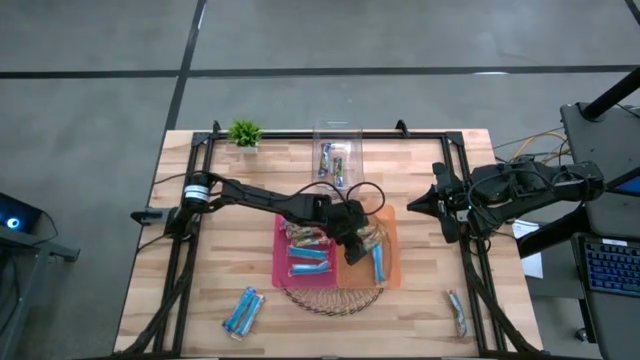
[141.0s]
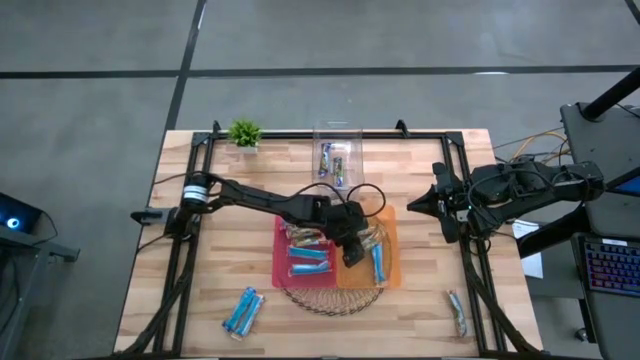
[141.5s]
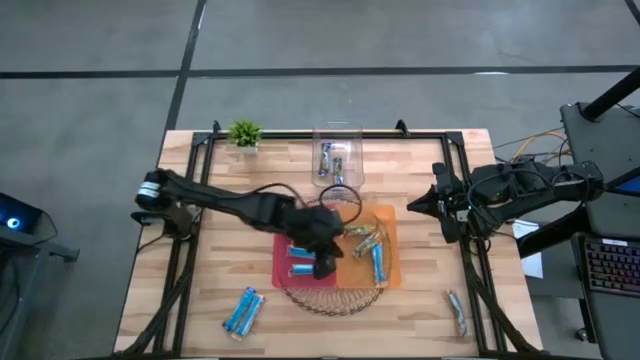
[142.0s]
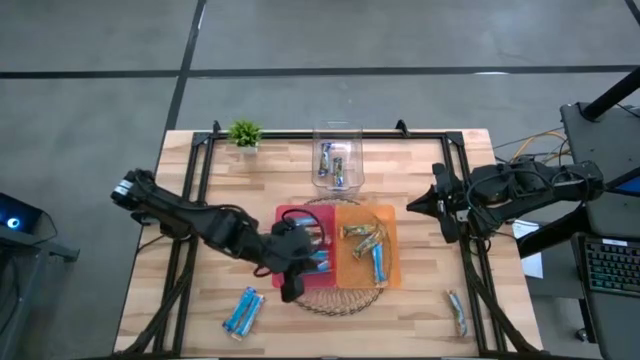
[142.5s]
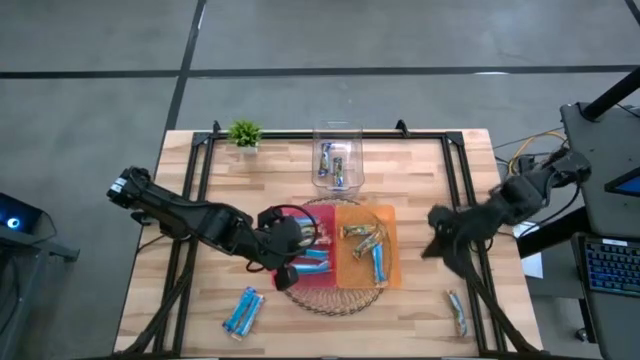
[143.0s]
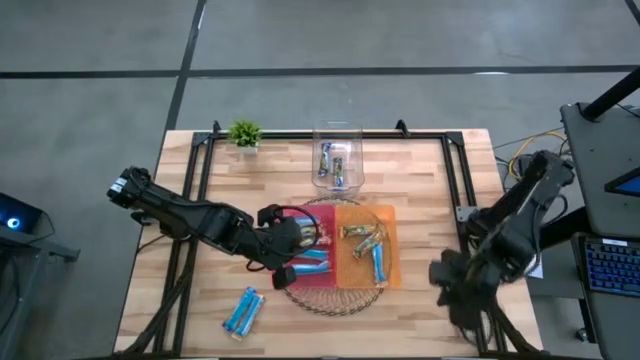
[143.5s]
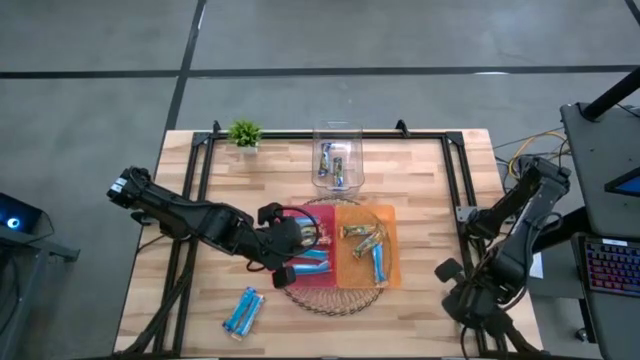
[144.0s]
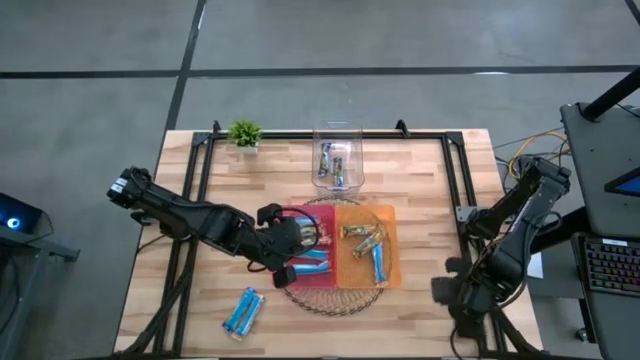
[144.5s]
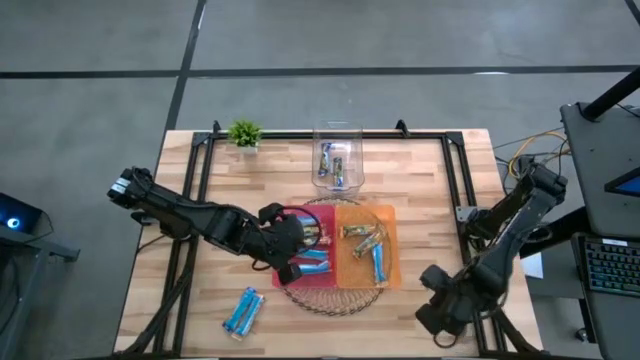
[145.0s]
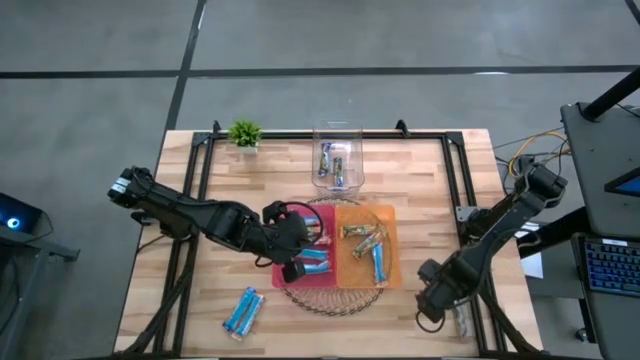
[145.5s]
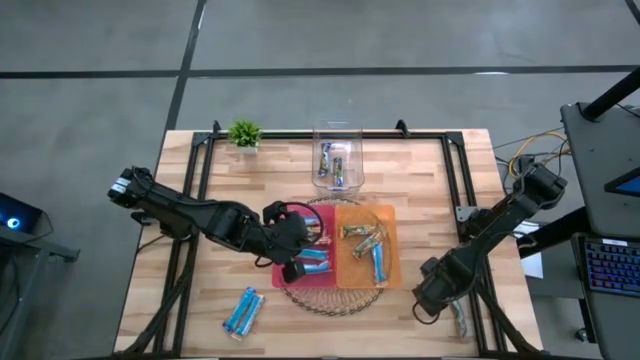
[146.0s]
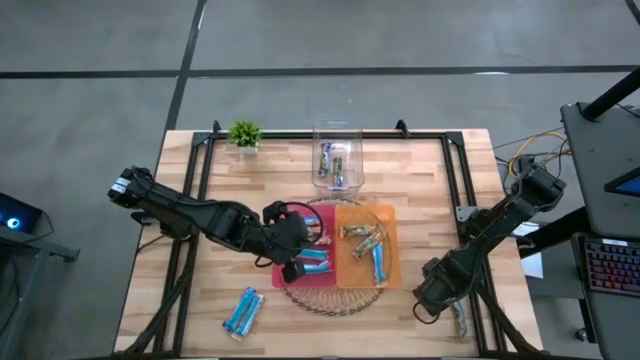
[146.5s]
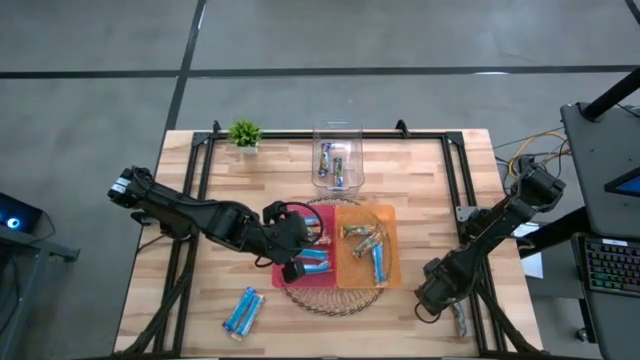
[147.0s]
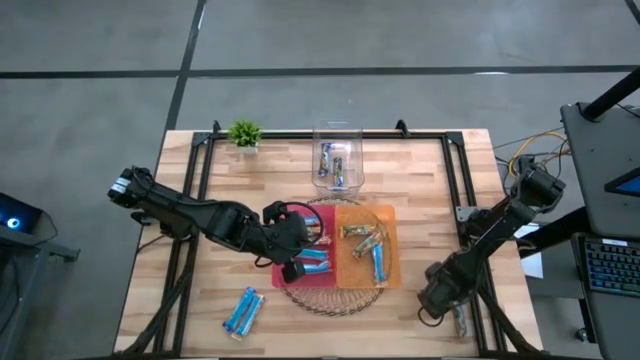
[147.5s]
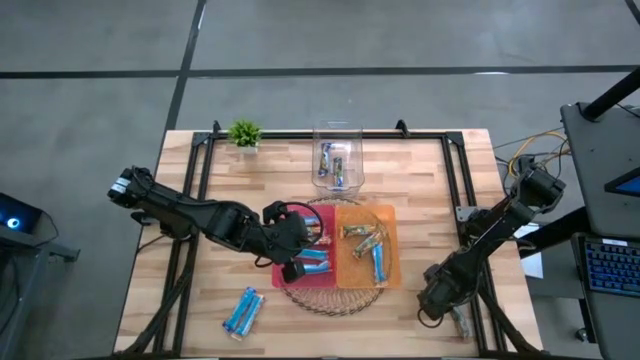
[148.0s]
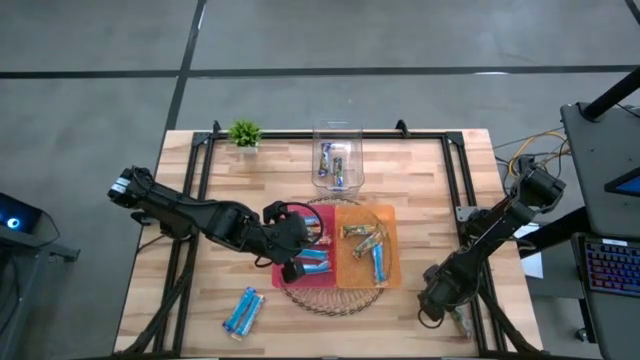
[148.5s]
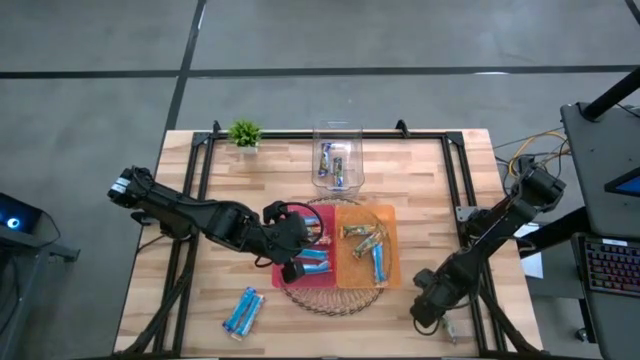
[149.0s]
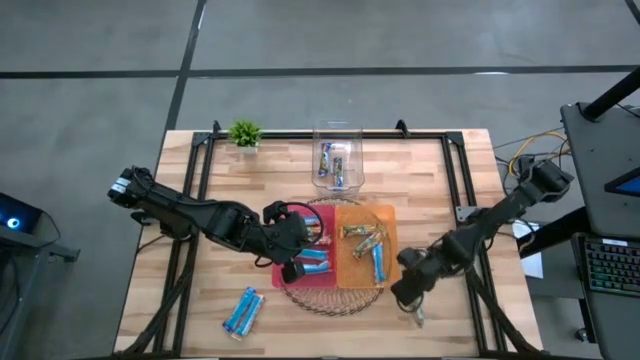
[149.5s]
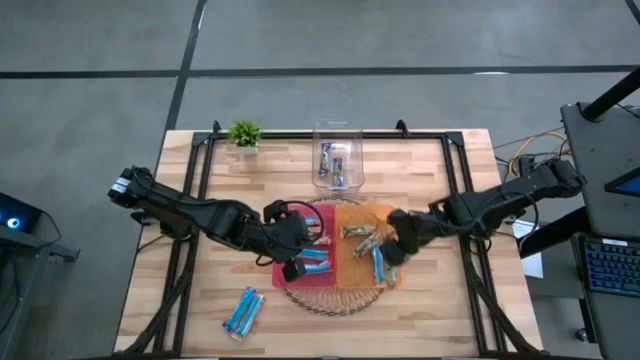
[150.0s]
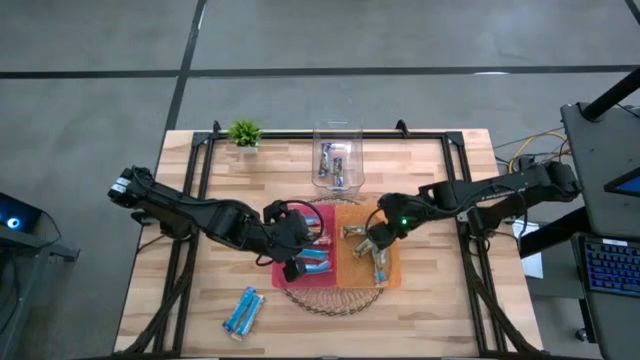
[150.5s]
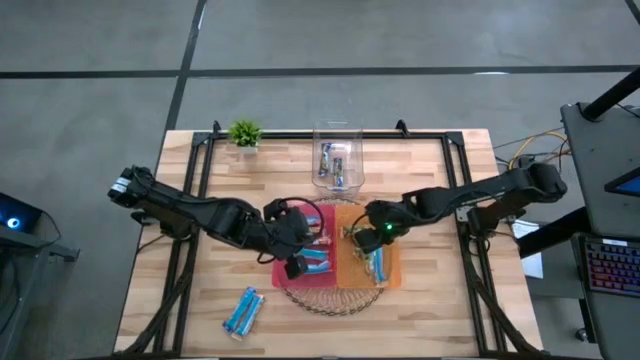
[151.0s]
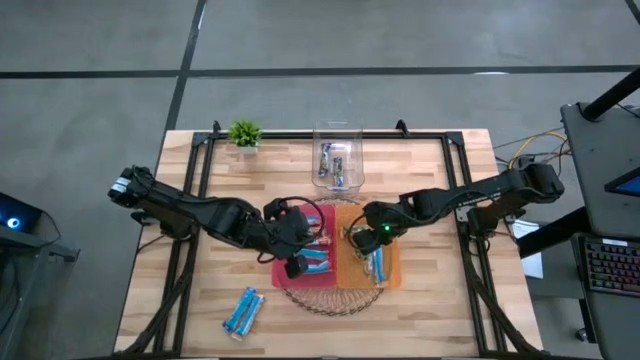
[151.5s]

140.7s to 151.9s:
Task: Pick and place Granola Bars by type
Put the yellow granola bar into the orange bin

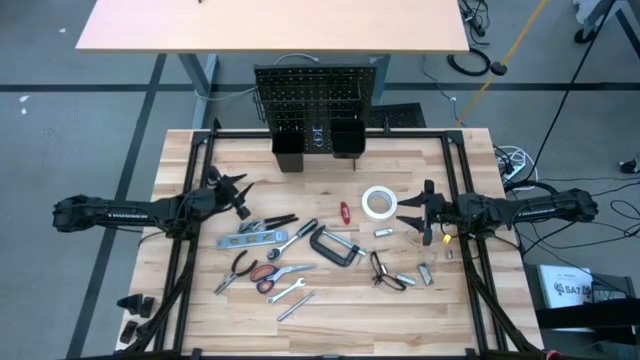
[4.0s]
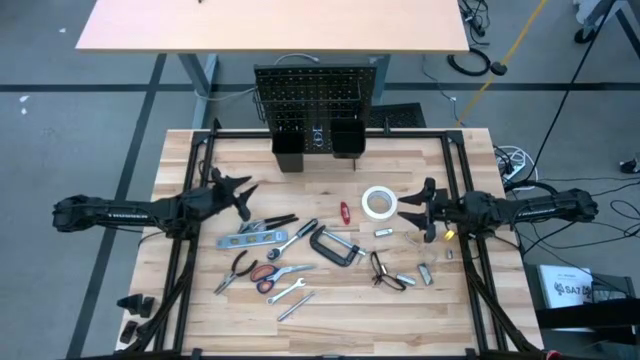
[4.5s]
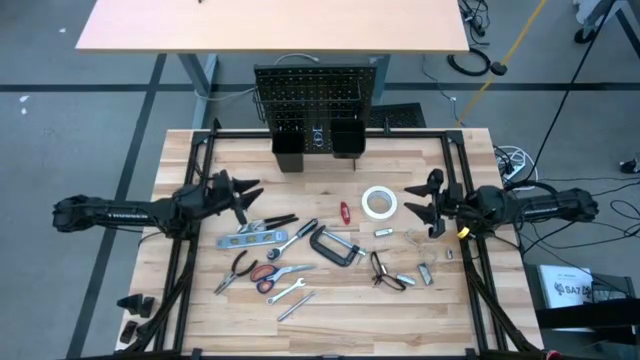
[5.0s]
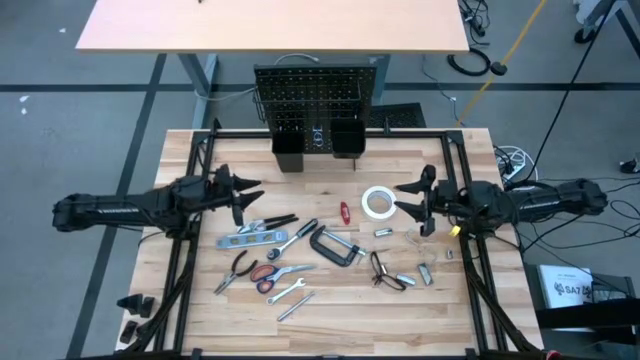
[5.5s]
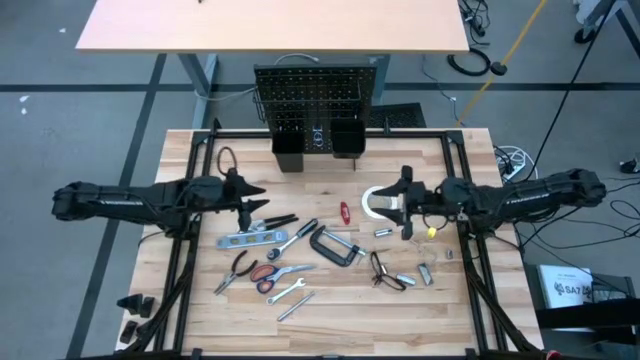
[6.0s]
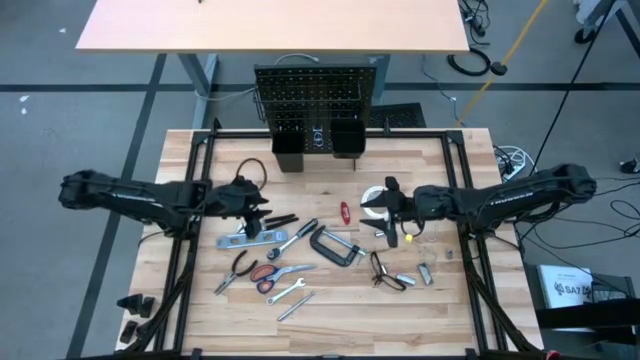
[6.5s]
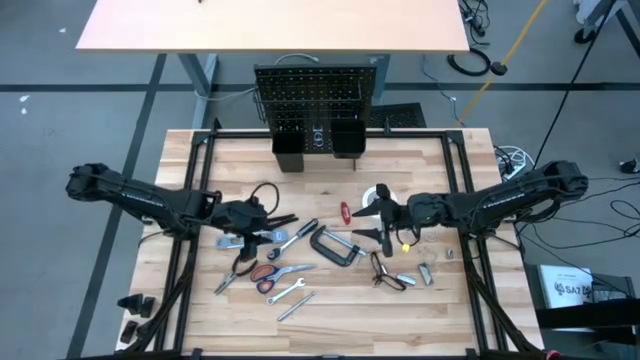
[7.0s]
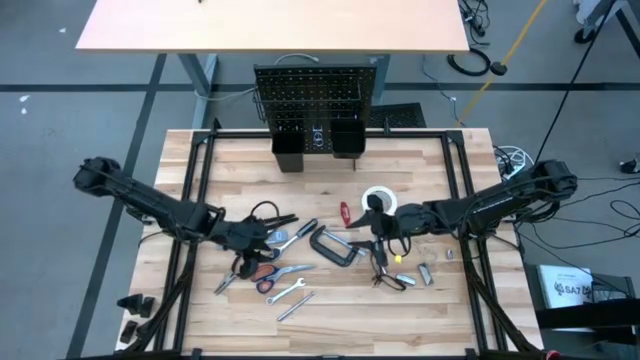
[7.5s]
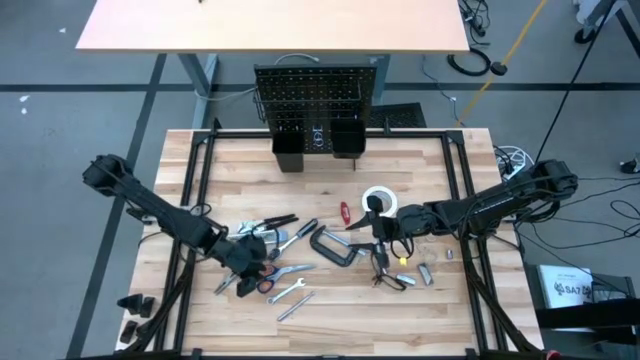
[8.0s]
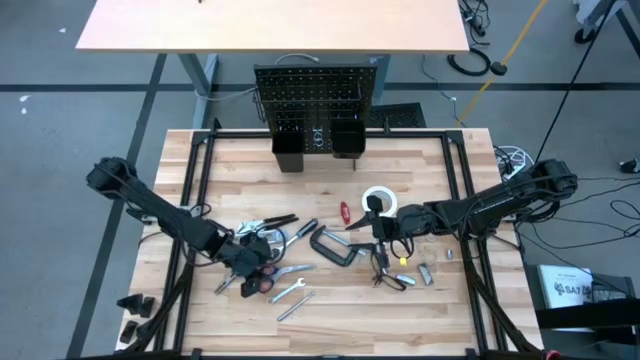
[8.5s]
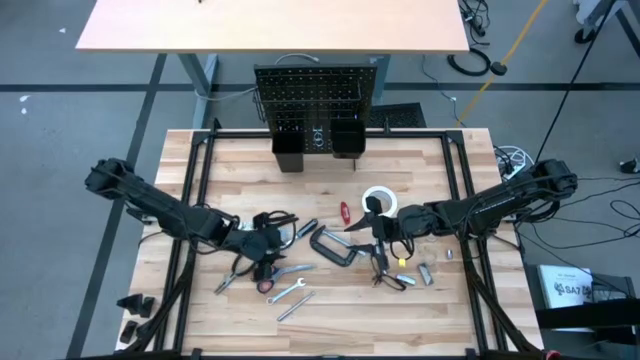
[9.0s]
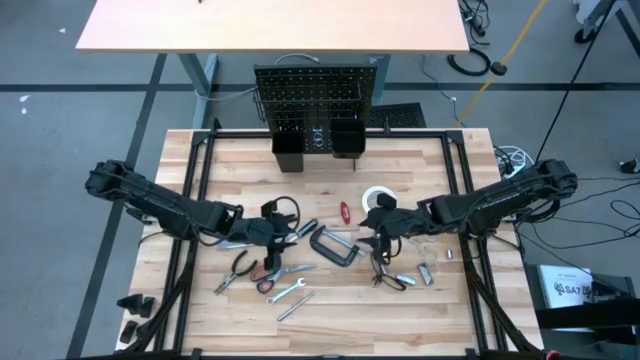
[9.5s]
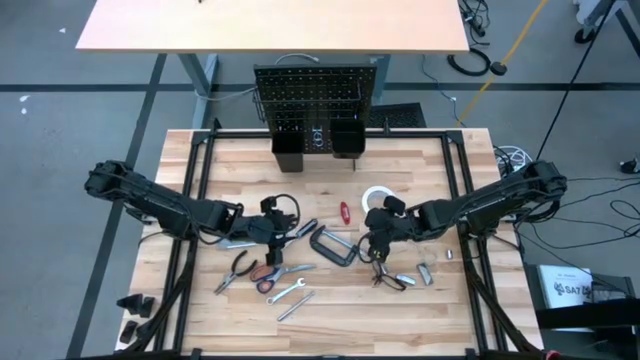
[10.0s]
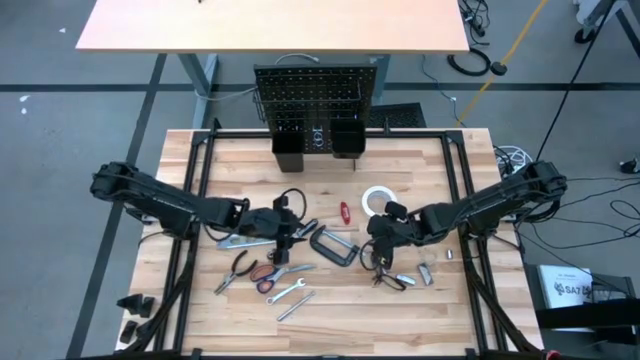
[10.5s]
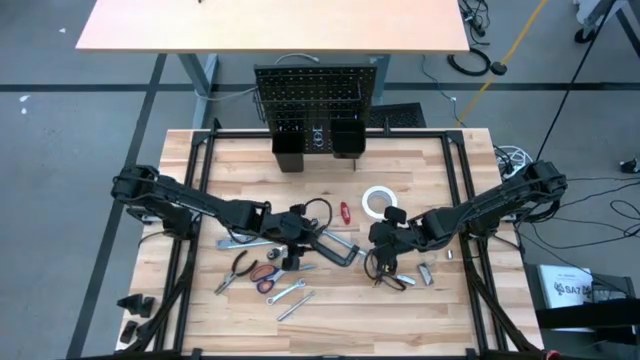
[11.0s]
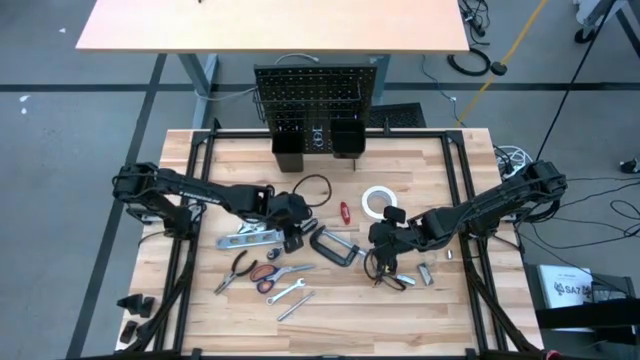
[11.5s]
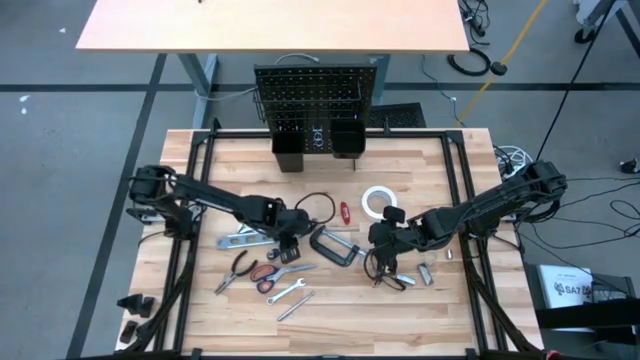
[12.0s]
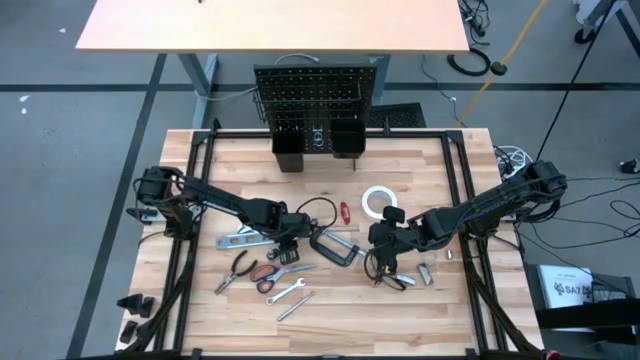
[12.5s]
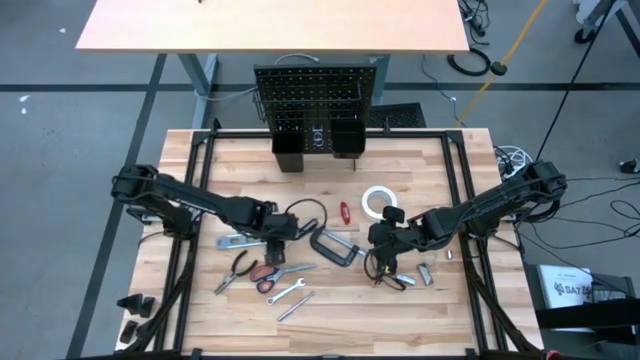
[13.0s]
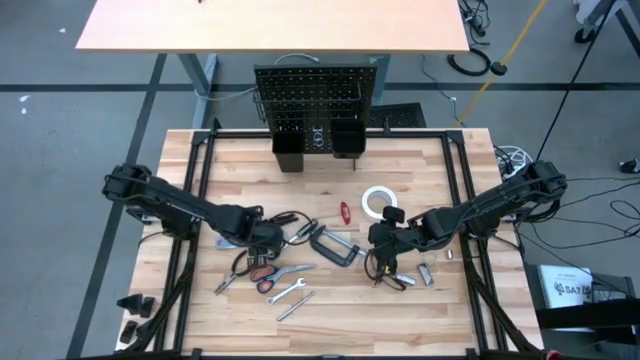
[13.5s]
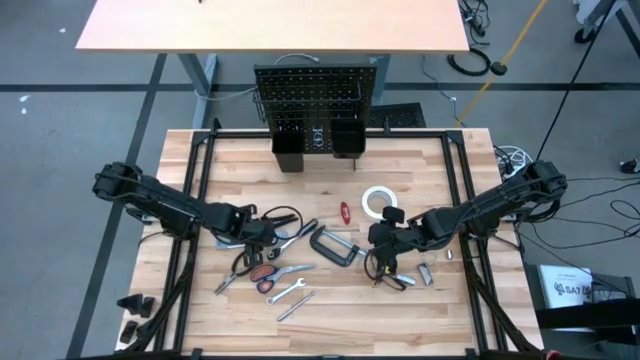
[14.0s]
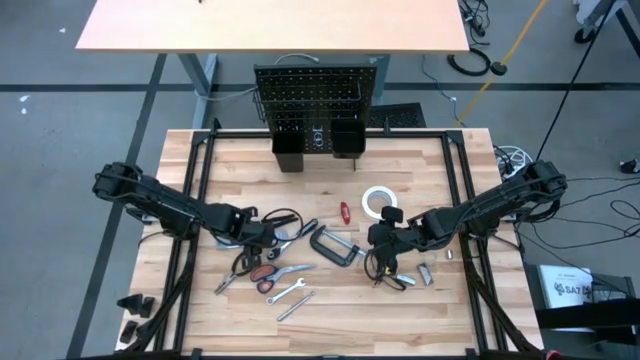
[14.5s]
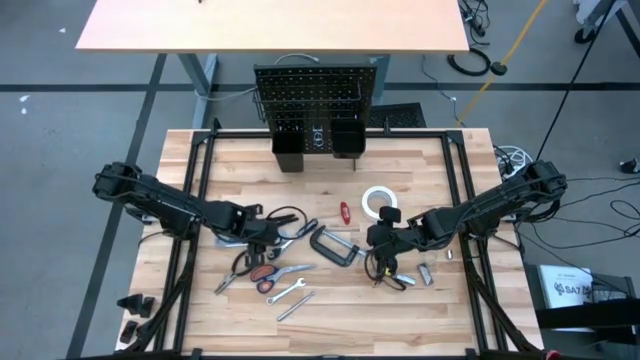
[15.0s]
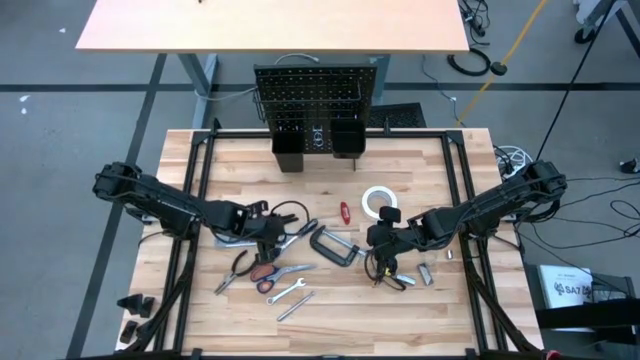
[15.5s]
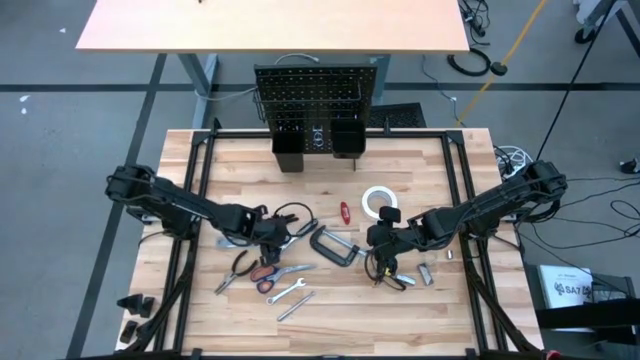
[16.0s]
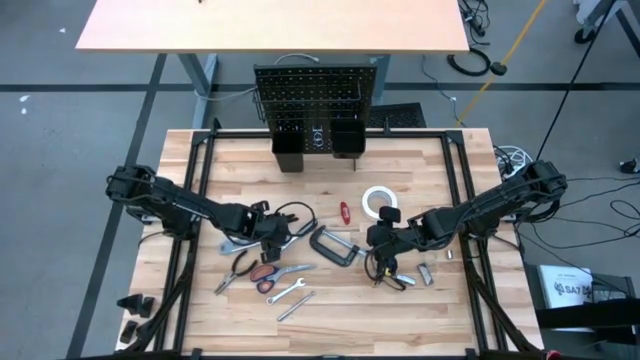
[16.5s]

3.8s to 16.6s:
Task: Hang tools onto peg board
Put the spirit level on the left lower deck of the pegboard
